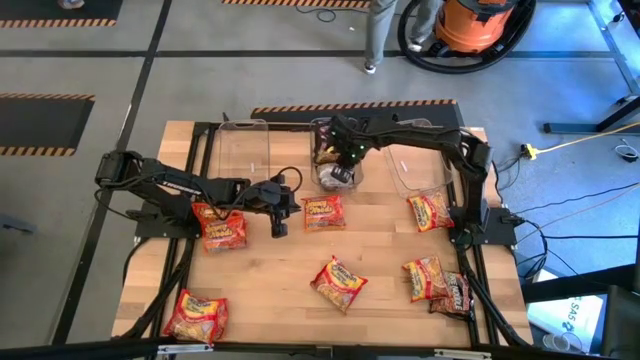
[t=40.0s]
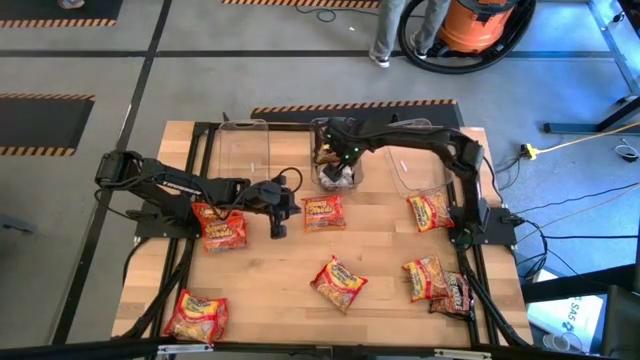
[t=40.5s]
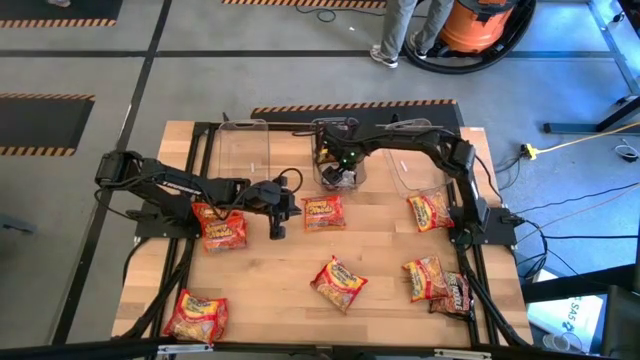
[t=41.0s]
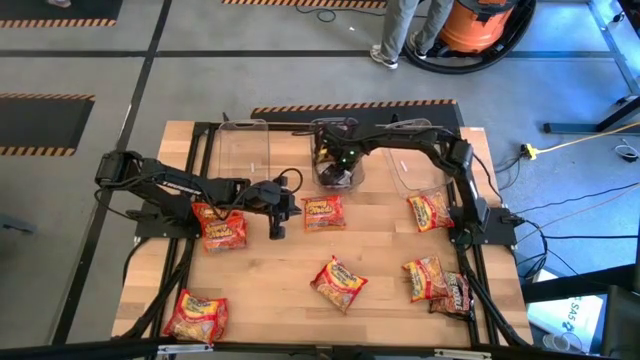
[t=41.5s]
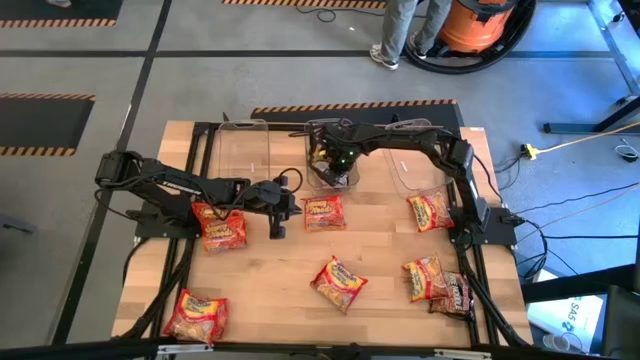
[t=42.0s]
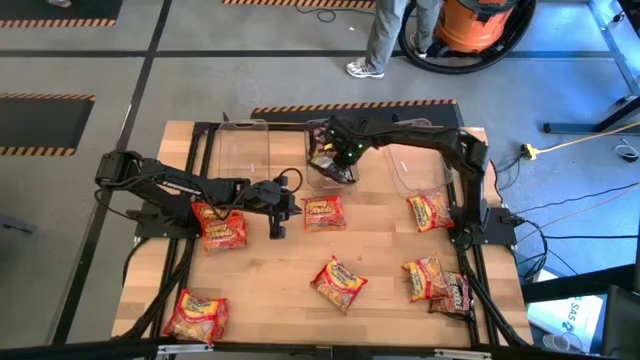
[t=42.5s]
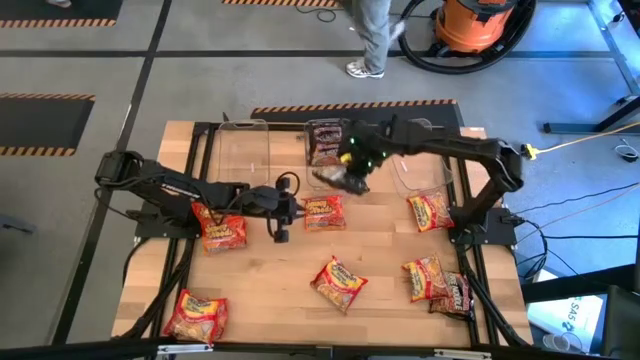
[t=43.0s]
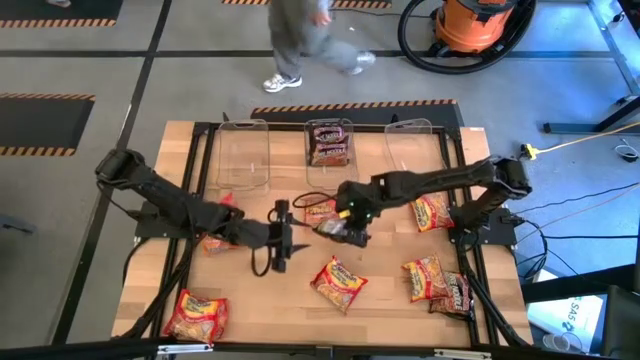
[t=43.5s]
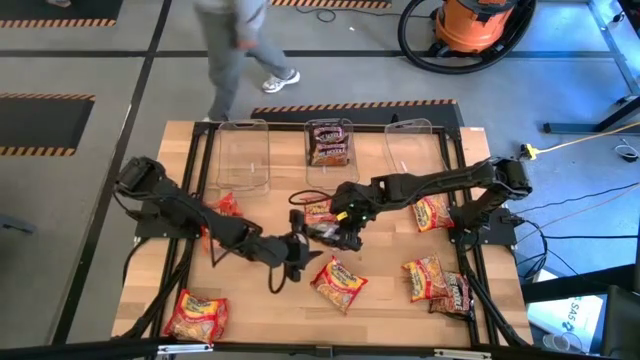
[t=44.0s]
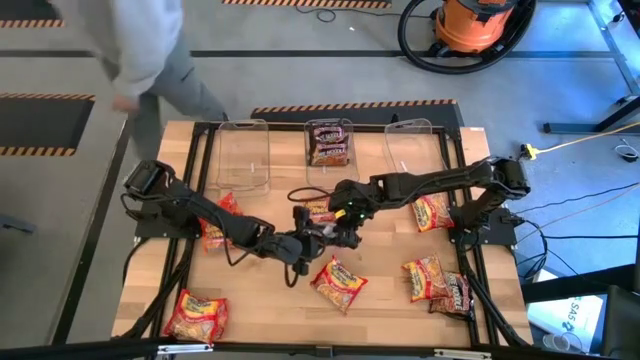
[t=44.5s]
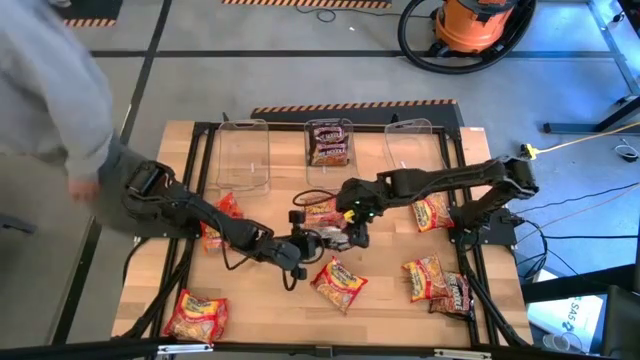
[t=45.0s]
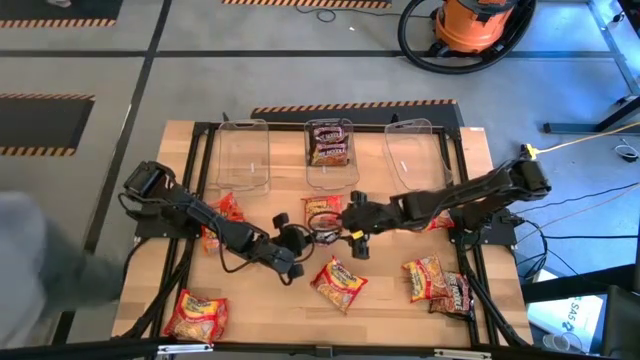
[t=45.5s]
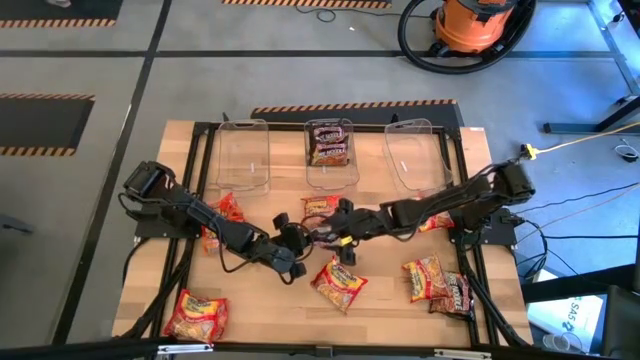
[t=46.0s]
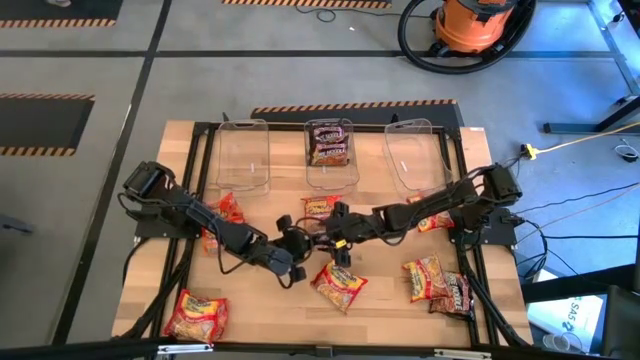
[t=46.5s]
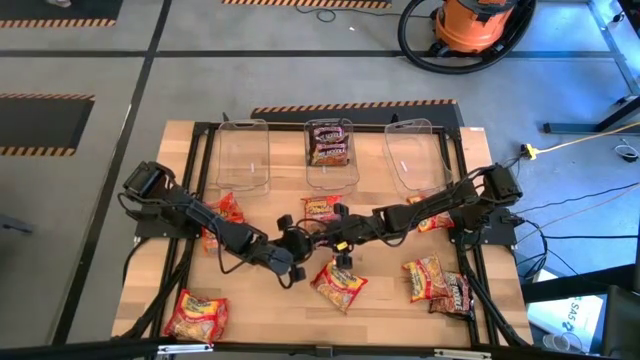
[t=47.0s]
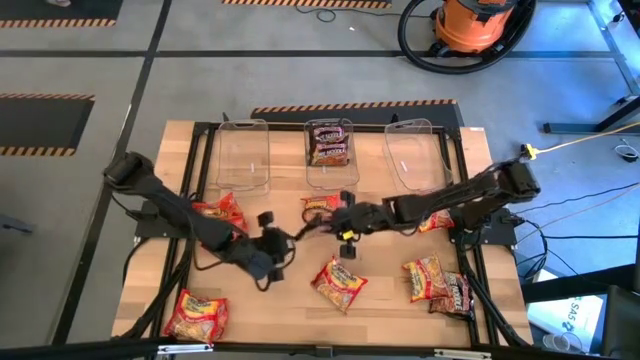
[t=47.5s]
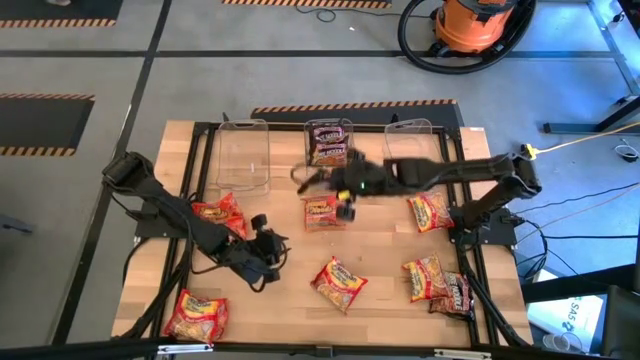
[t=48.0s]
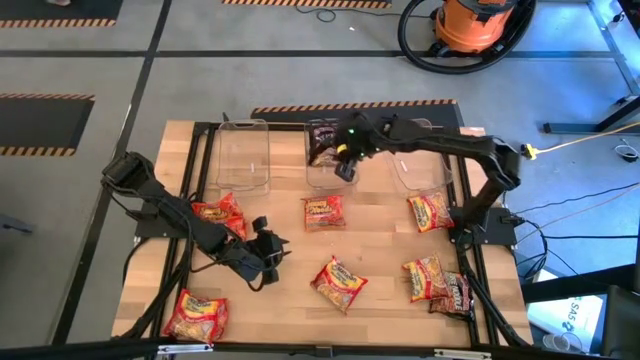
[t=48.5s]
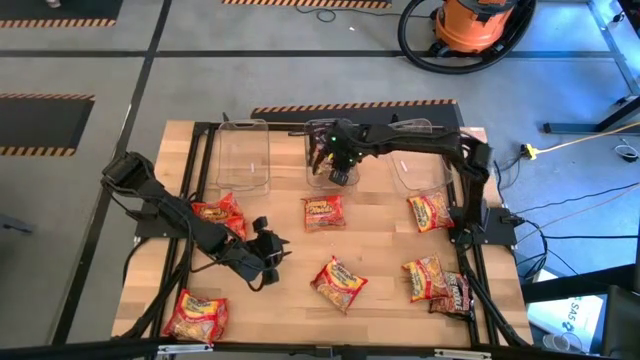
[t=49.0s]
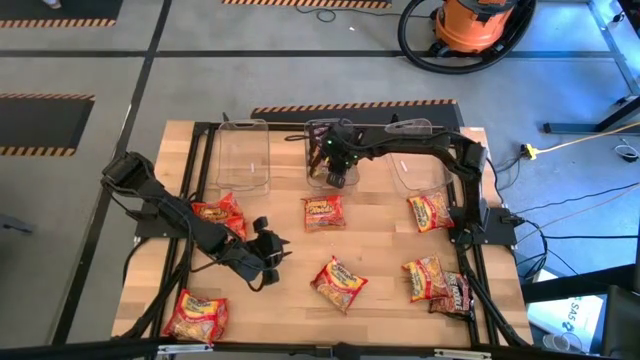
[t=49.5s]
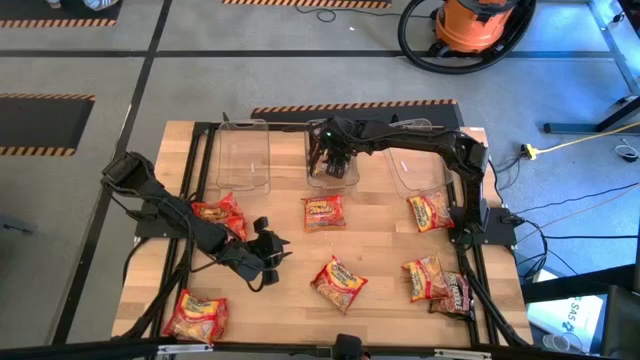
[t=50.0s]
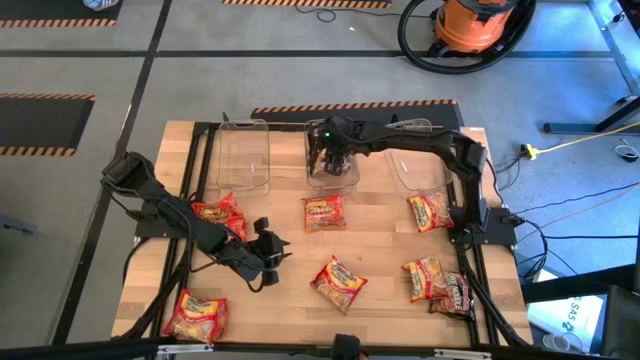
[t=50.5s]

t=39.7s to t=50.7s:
Task: Sort Maruchan noodles
Put the top black noodle pack into the middle transparent bin

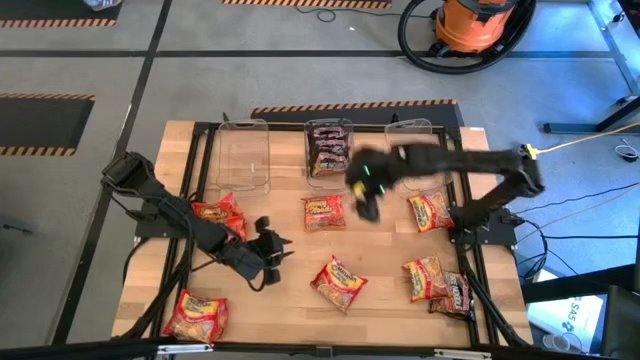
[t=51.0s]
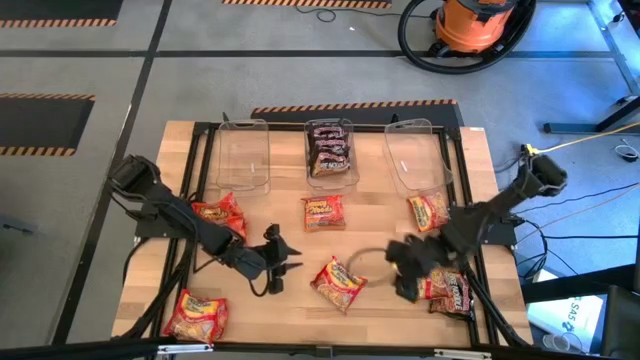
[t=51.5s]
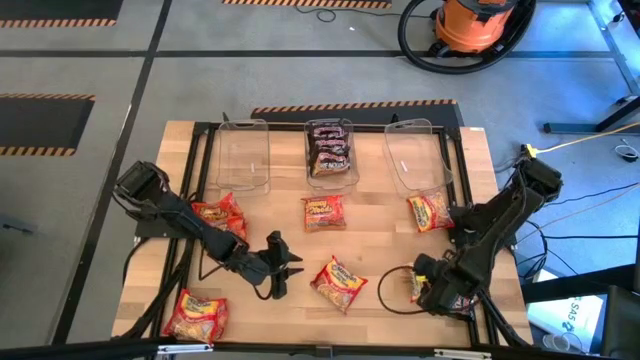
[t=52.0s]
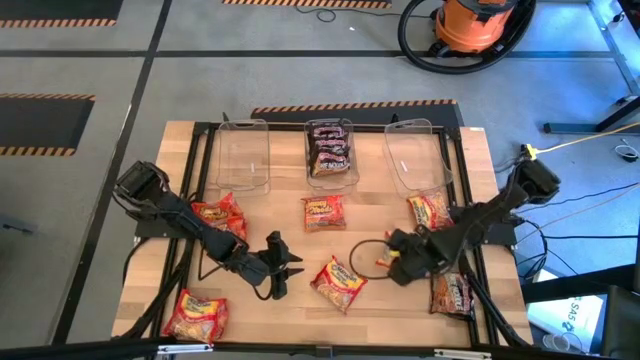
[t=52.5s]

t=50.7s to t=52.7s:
Adjust the red noodle pack

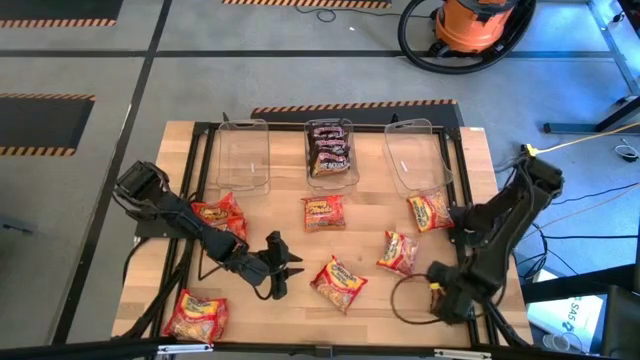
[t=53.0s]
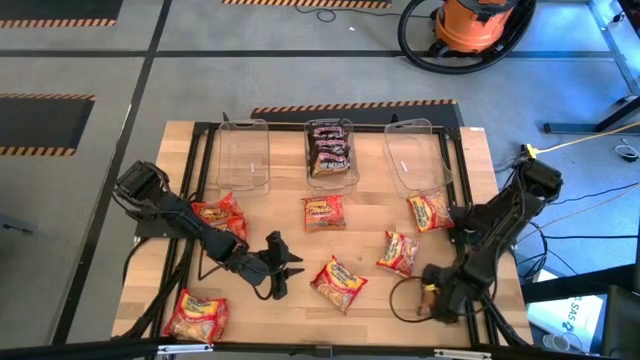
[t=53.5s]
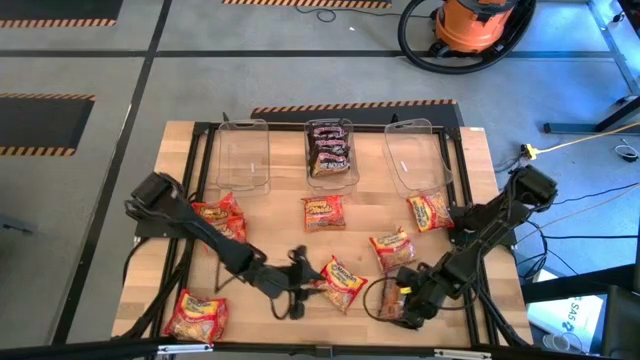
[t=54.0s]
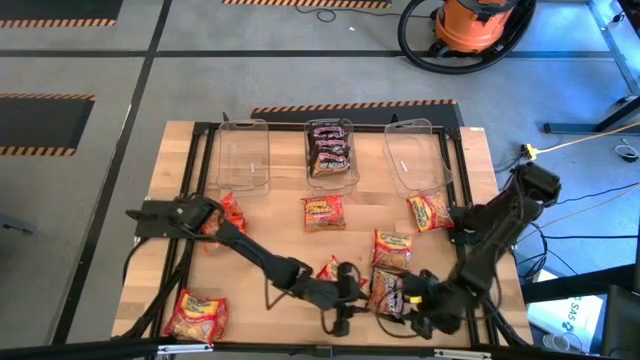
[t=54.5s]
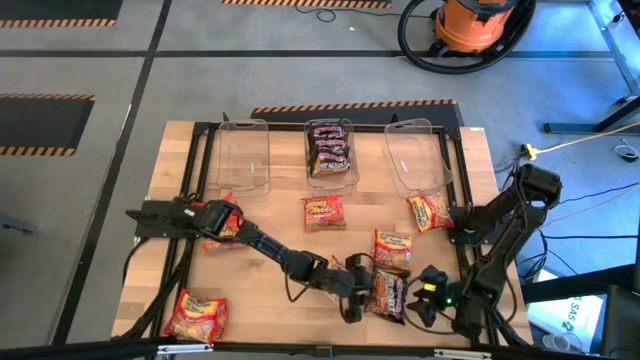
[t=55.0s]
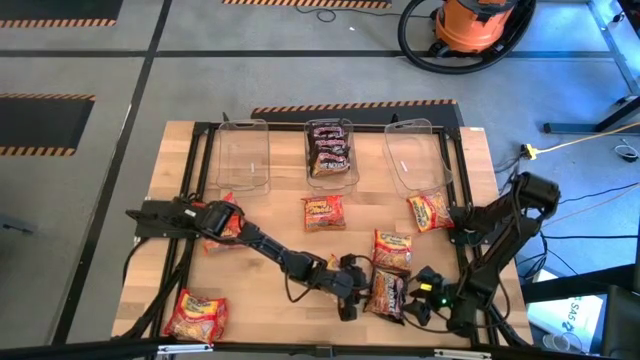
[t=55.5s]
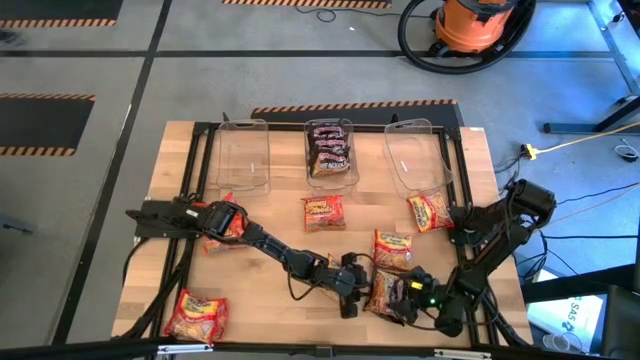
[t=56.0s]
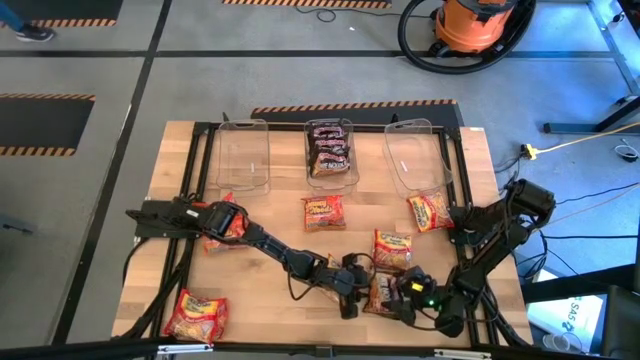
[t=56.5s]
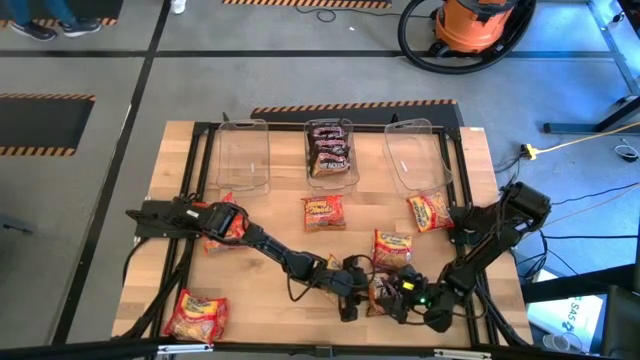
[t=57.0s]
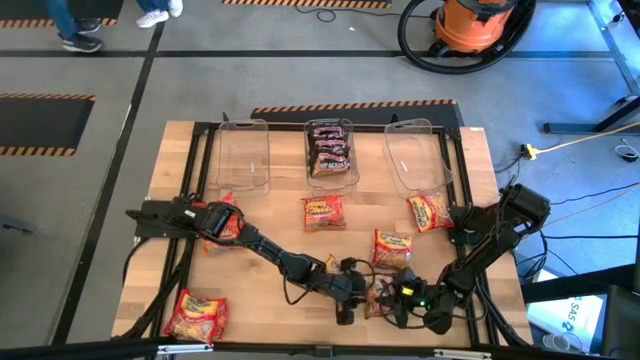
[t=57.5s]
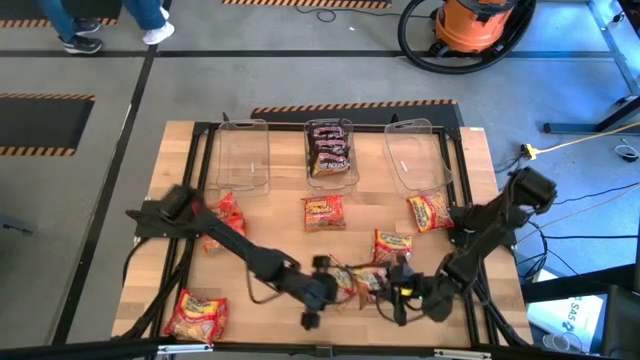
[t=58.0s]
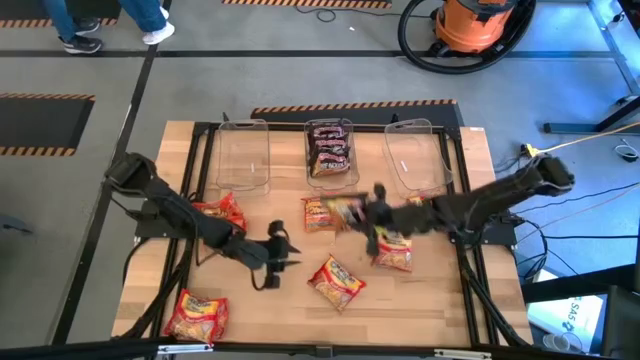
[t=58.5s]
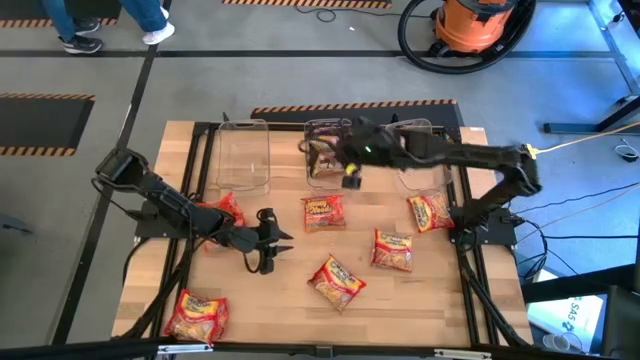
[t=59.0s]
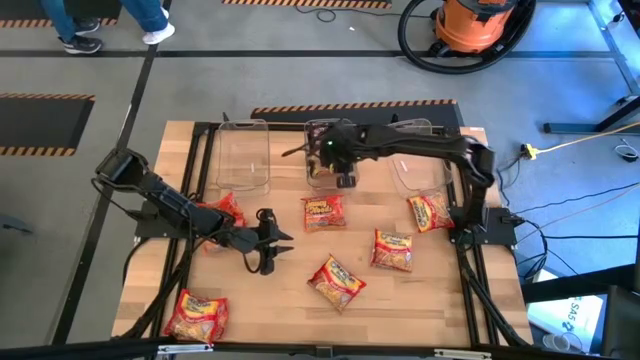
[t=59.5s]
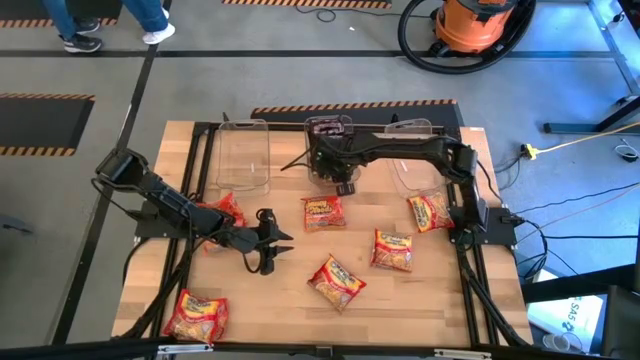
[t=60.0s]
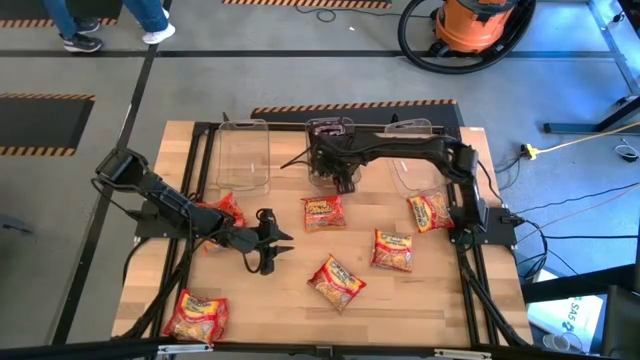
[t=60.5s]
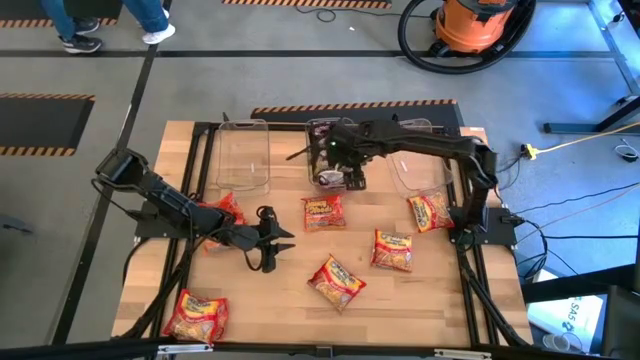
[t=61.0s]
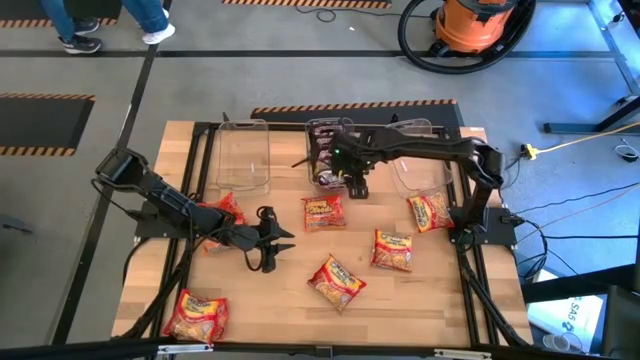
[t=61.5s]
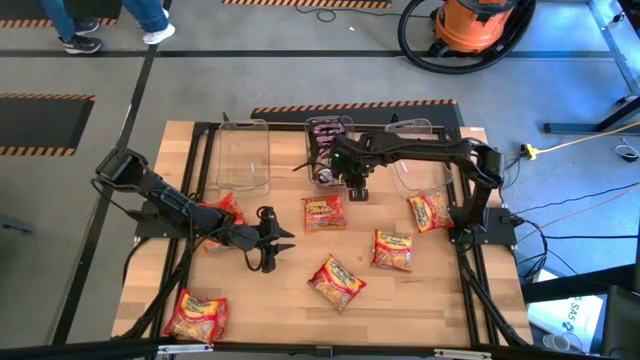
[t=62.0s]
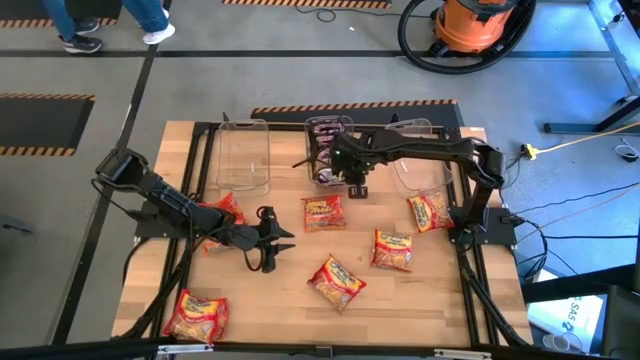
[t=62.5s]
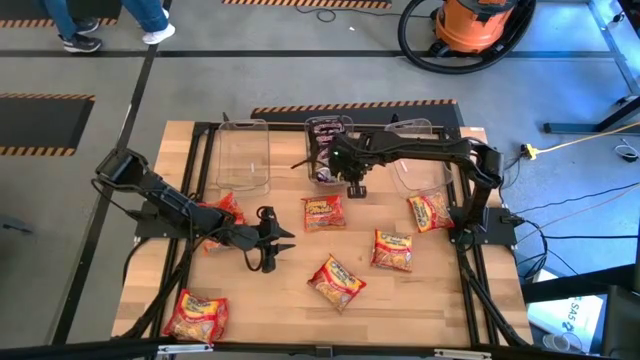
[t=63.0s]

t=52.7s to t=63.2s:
Put the black noodle pack into the middle transparent bin
